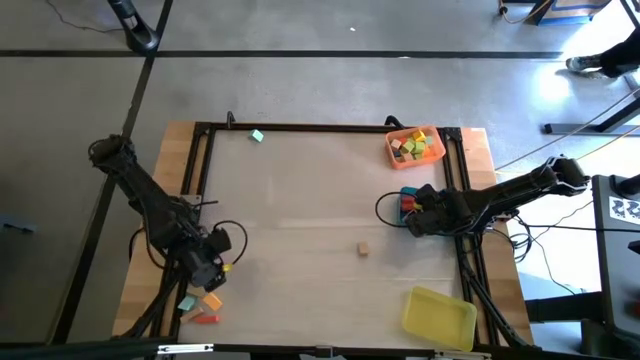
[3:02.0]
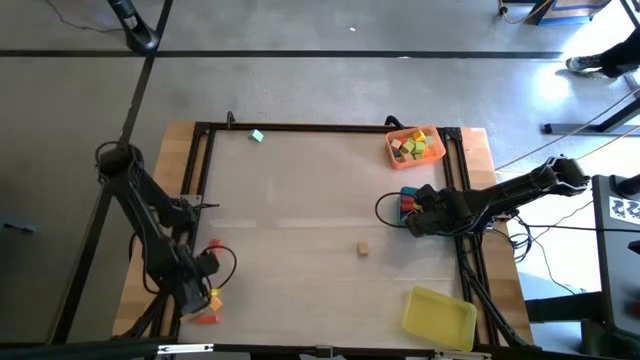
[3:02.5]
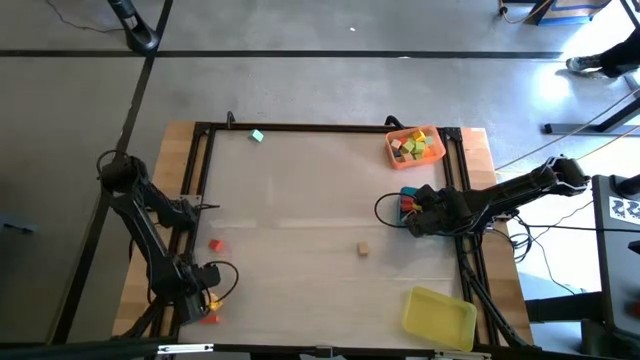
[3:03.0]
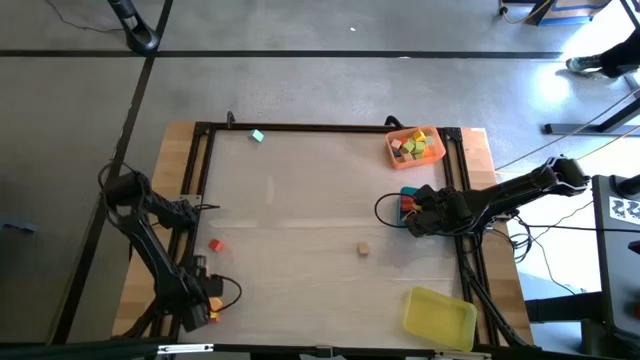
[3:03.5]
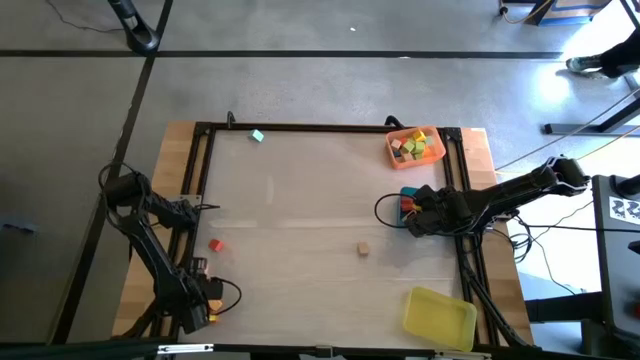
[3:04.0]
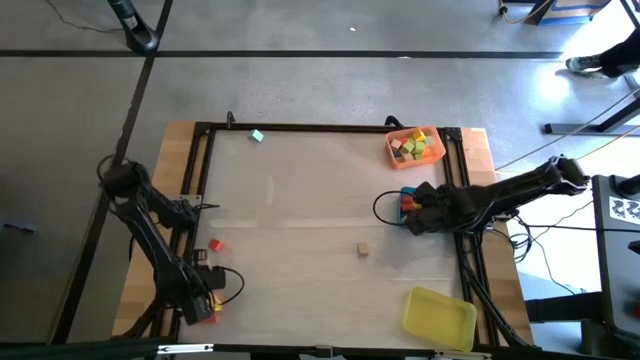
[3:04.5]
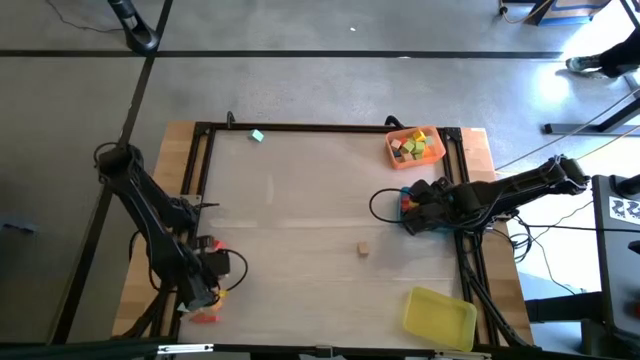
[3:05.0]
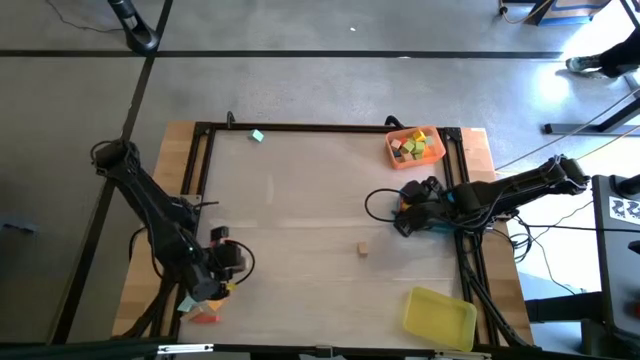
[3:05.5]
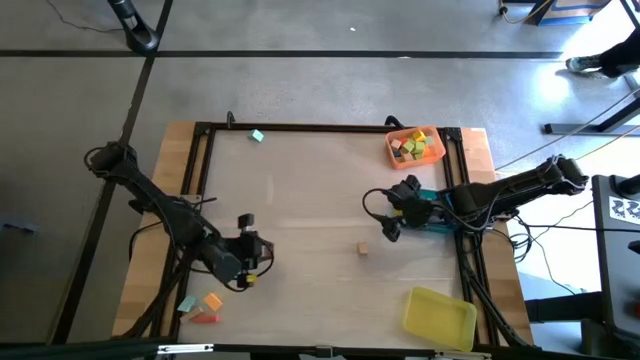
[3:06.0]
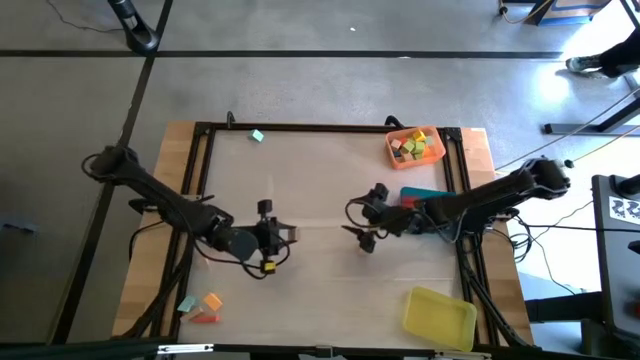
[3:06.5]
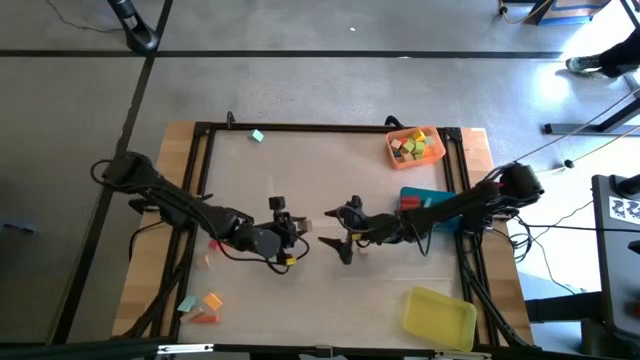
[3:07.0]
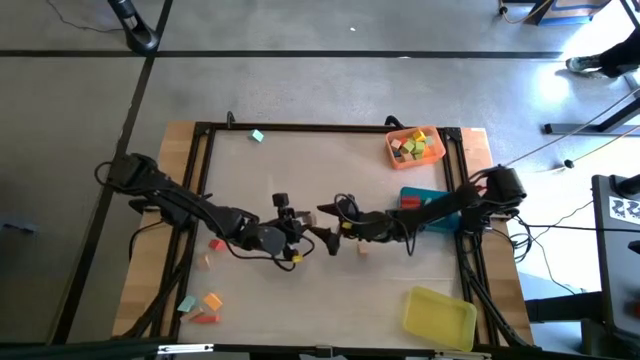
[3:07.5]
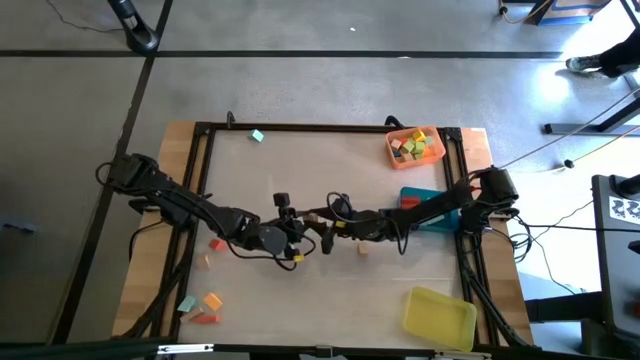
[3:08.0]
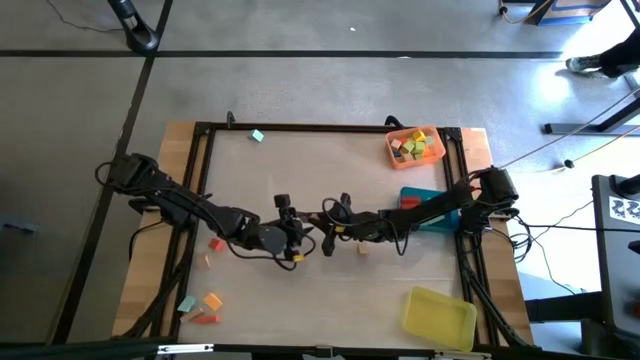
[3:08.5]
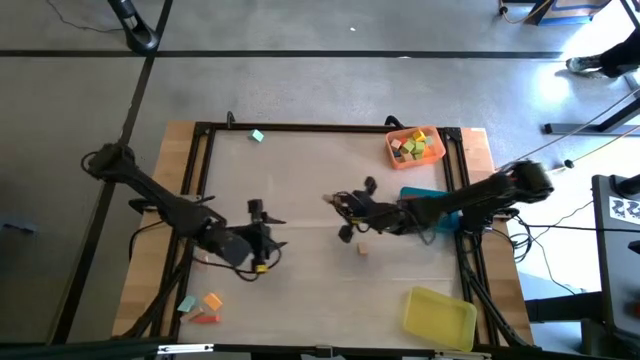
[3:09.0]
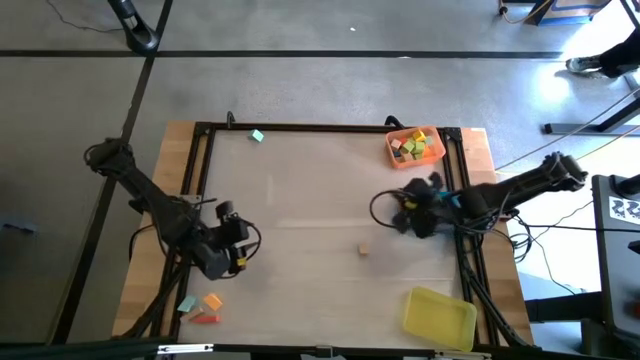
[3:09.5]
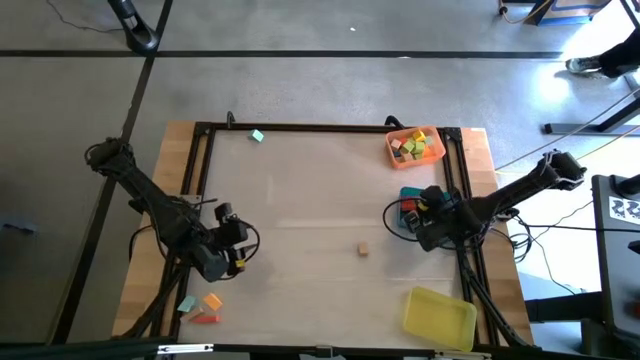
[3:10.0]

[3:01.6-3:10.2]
Task: Sort blocks by size
Put the brown rectangular block into the blue bin

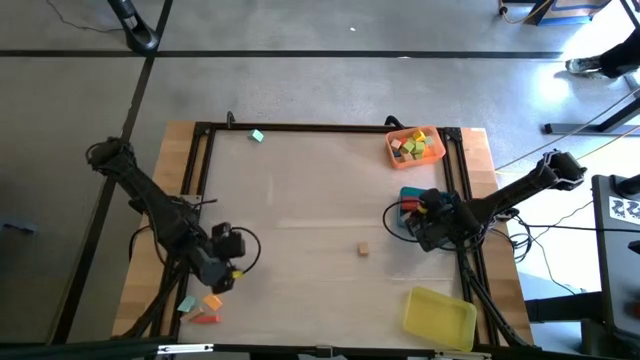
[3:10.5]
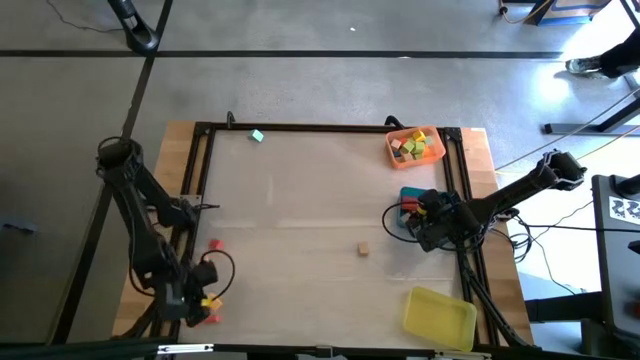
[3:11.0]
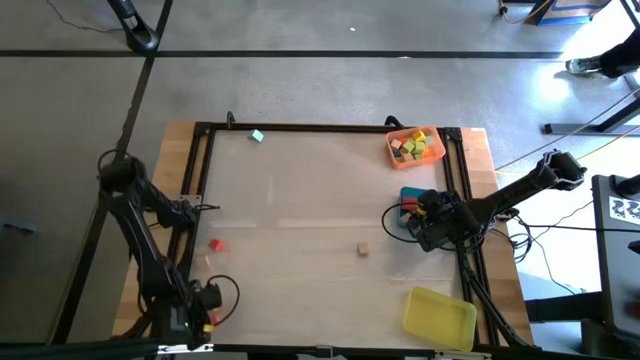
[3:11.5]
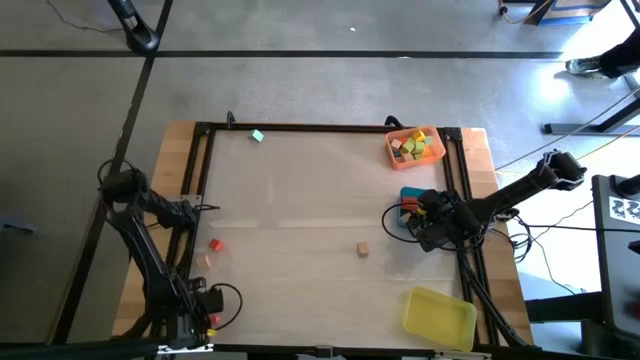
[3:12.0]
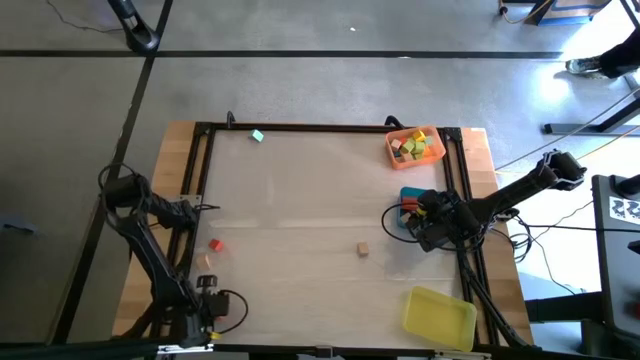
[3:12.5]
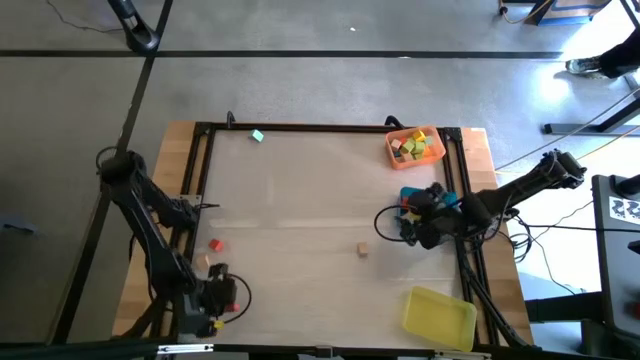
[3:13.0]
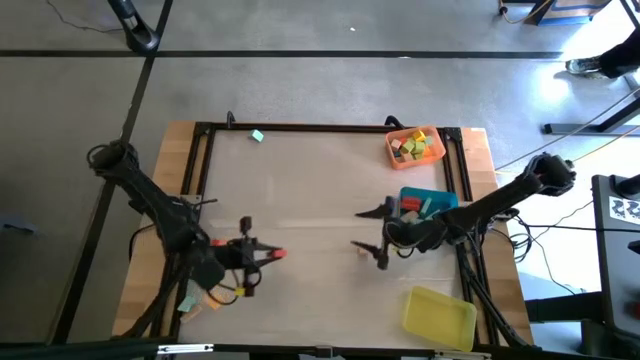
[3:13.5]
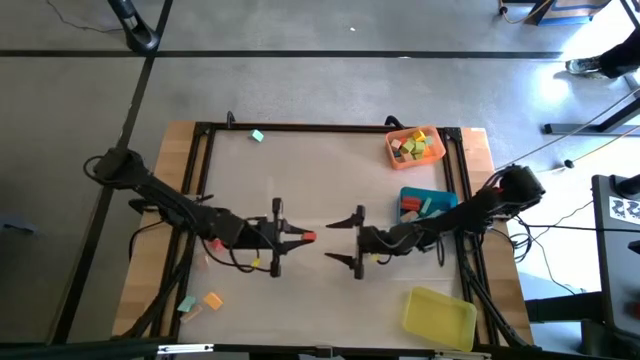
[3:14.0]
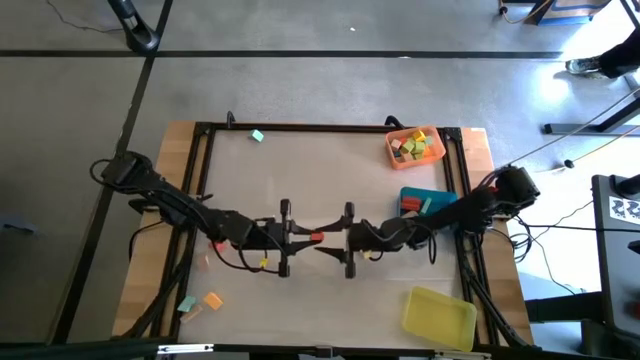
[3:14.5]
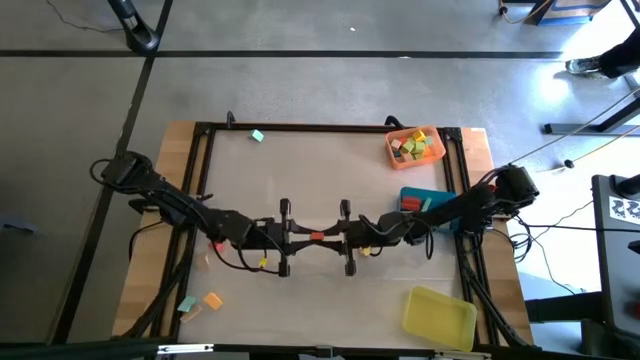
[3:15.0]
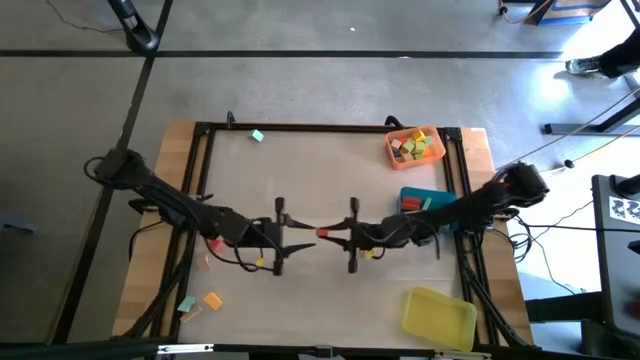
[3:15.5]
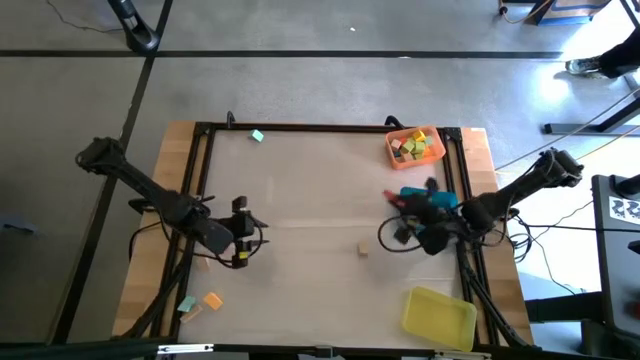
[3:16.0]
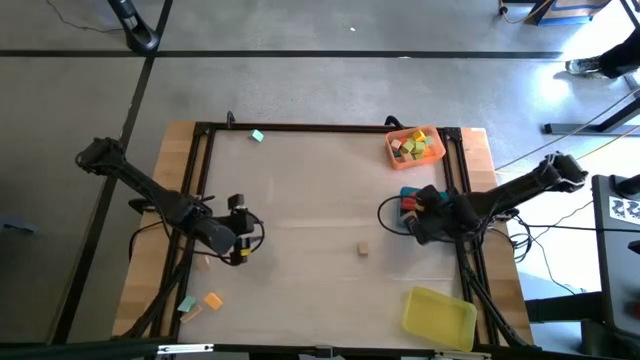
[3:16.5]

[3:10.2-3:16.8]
Put the orange rectangular block into the blue bin

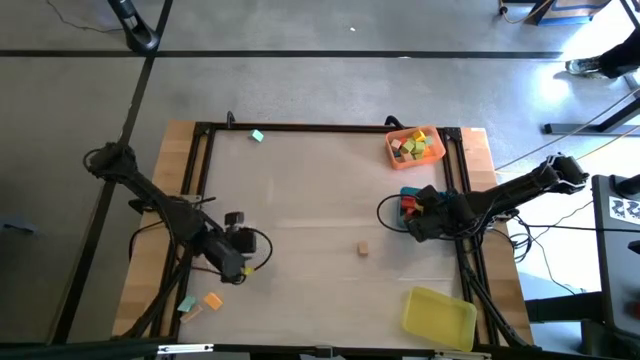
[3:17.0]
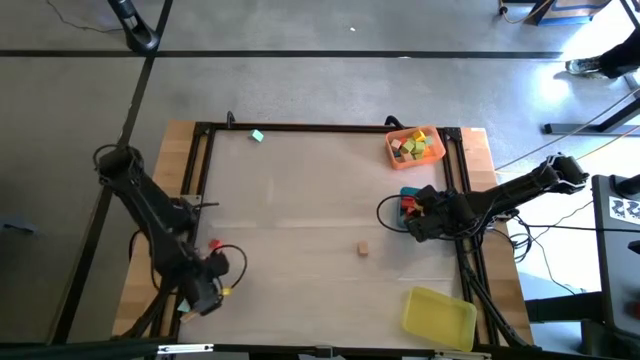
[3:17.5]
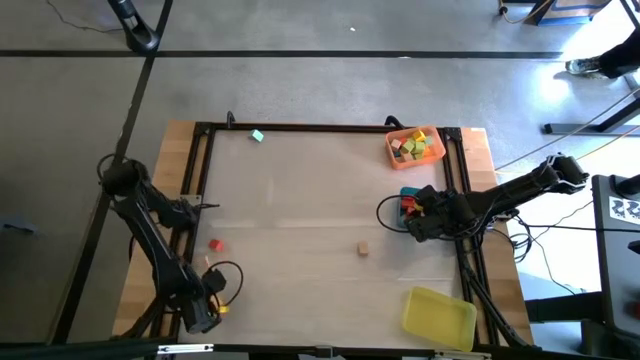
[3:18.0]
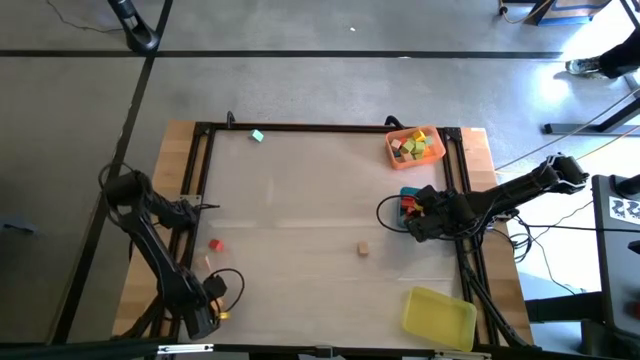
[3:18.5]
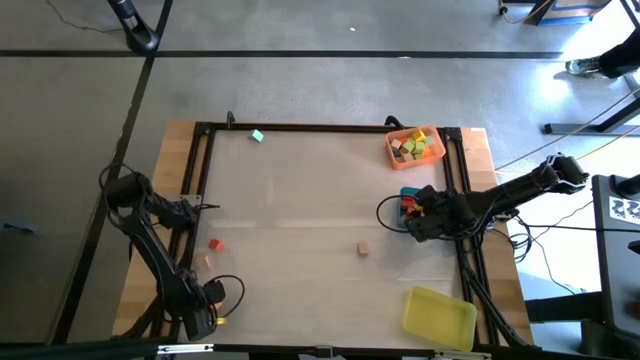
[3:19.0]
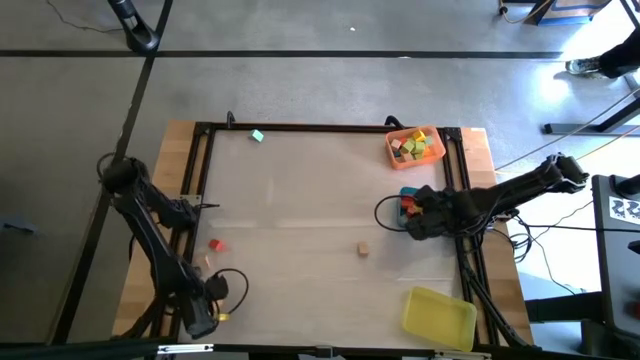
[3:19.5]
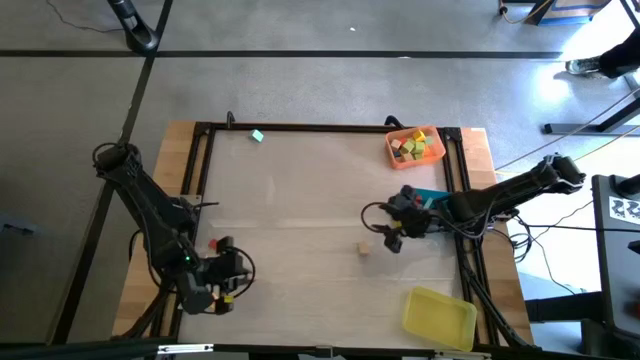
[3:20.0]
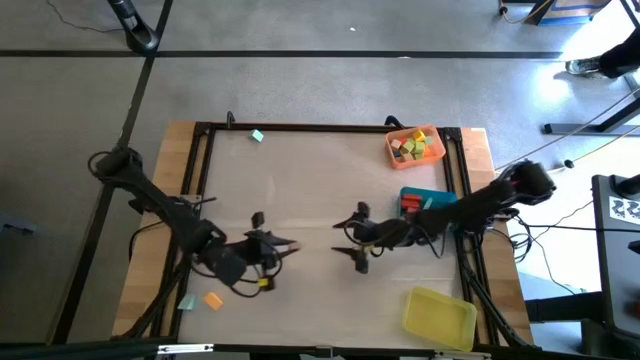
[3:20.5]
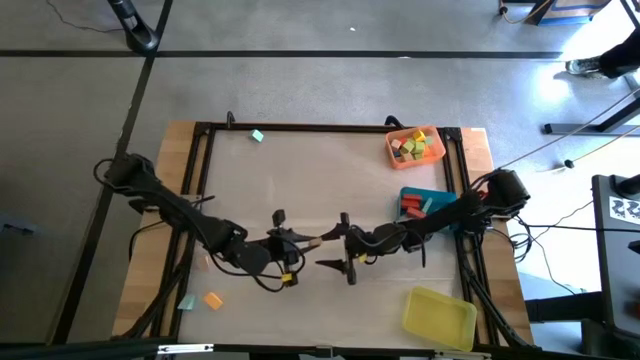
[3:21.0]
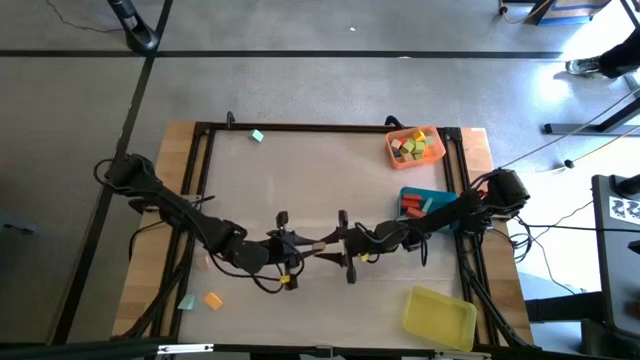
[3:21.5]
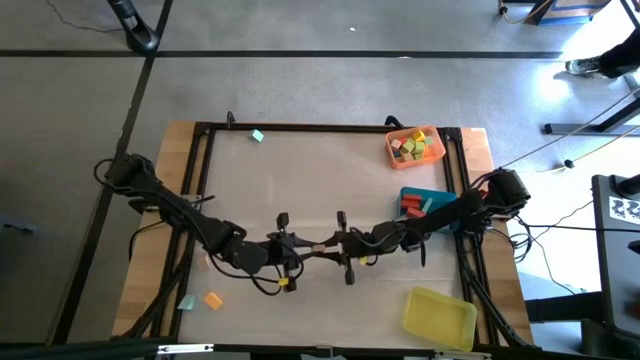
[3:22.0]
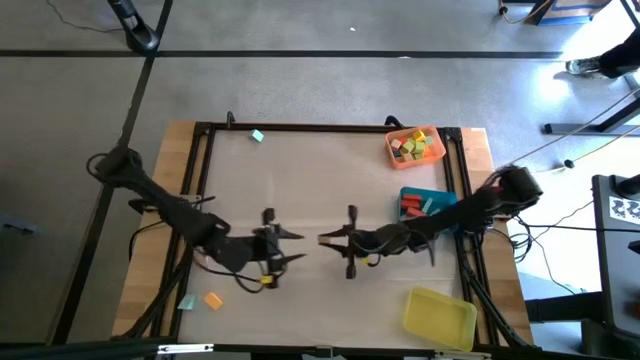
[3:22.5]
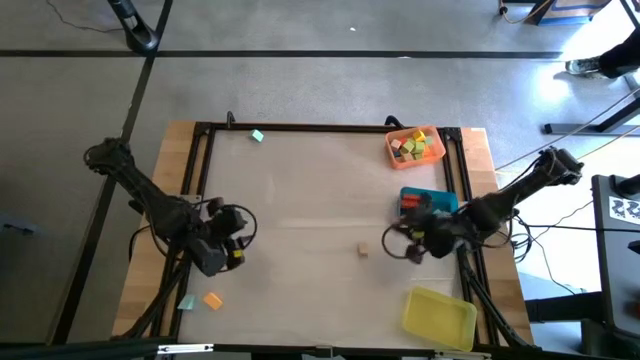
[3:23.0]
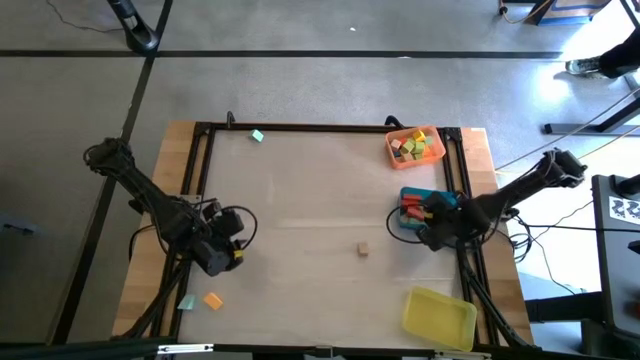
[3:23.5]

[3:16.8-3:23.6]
Put the brown rectangular block into the blue bin

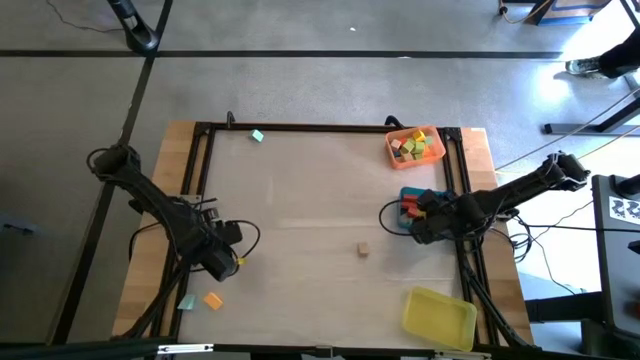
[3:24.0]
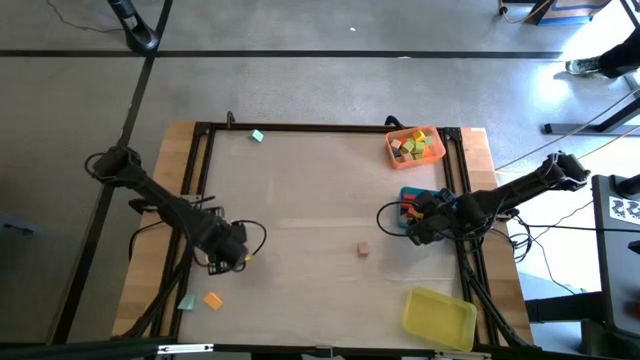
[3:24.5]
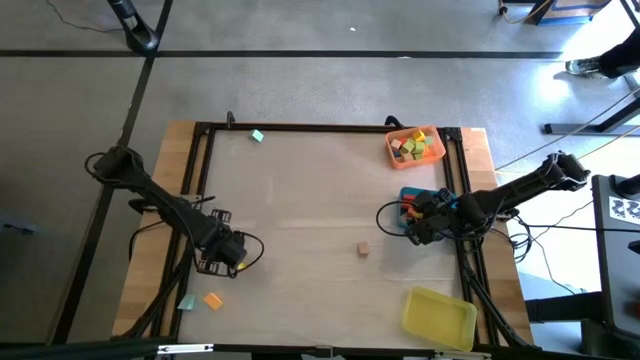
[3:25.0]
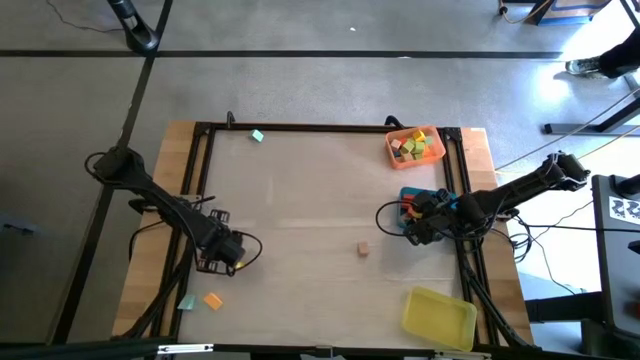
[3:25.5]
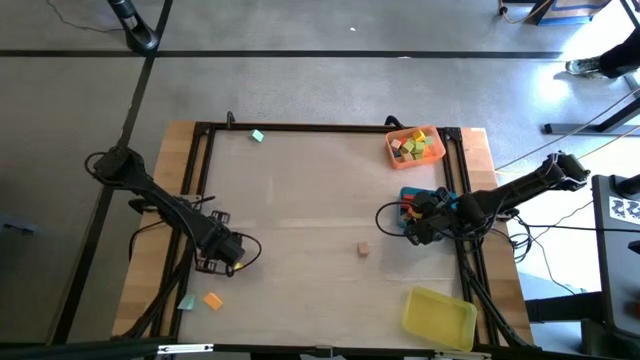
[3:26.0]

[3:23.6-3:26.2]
Put the brown triangular block into the yellow bin
